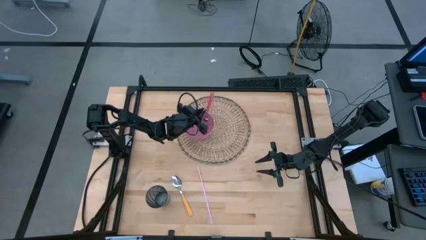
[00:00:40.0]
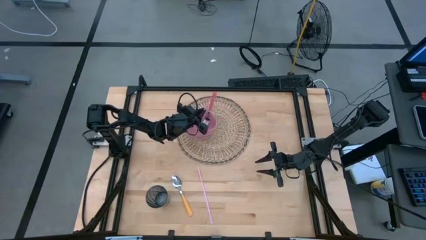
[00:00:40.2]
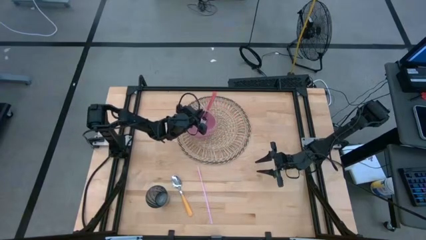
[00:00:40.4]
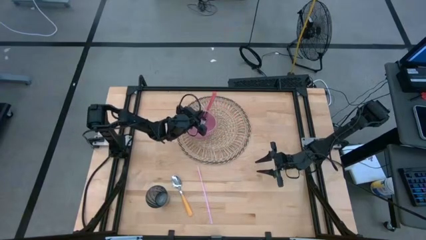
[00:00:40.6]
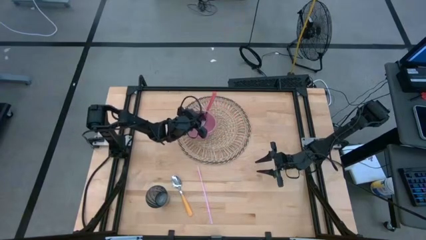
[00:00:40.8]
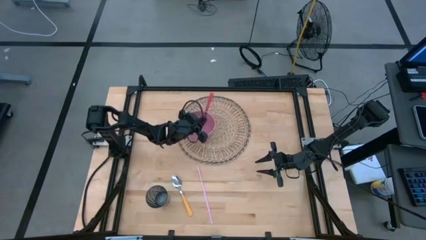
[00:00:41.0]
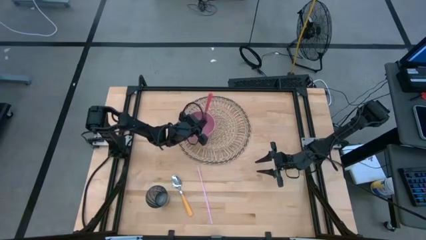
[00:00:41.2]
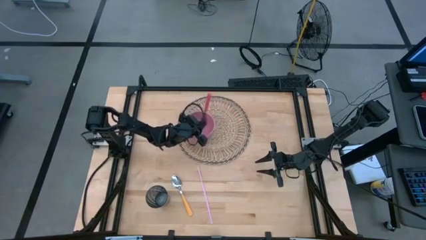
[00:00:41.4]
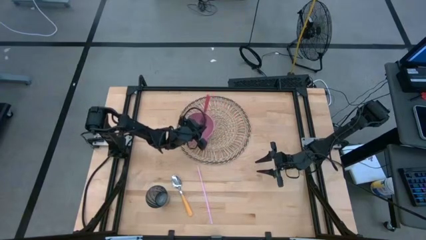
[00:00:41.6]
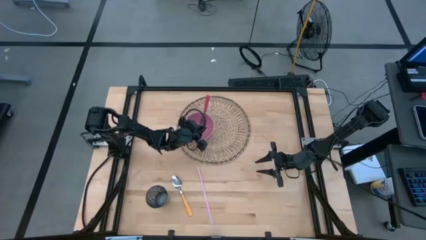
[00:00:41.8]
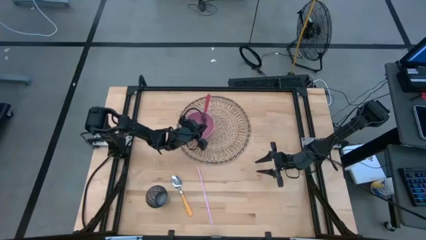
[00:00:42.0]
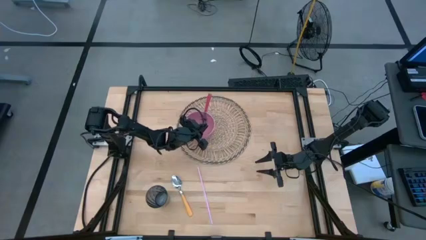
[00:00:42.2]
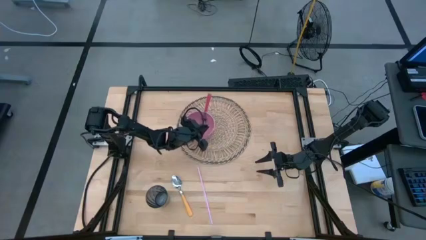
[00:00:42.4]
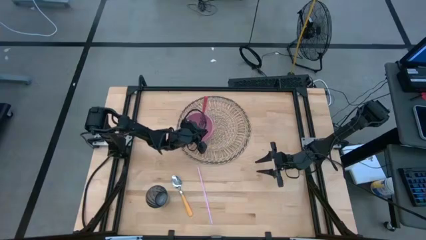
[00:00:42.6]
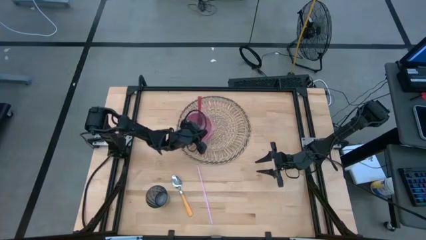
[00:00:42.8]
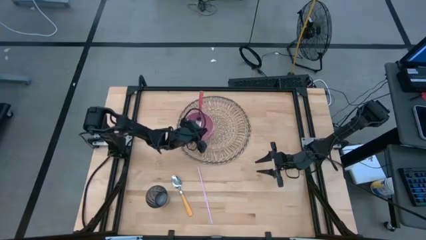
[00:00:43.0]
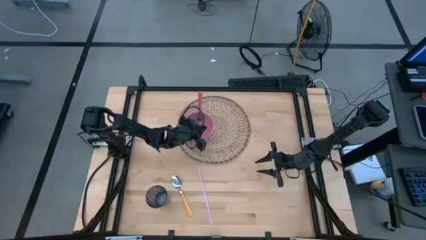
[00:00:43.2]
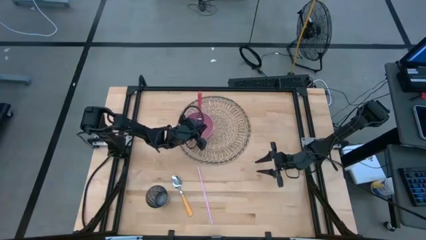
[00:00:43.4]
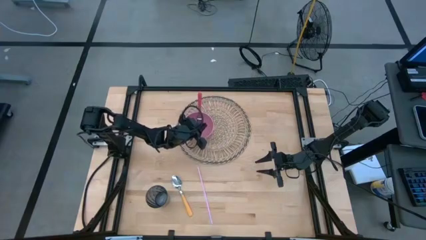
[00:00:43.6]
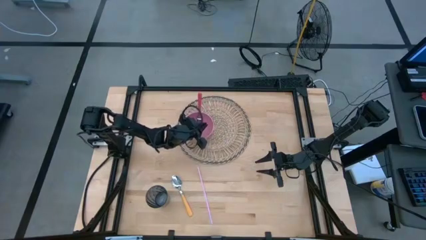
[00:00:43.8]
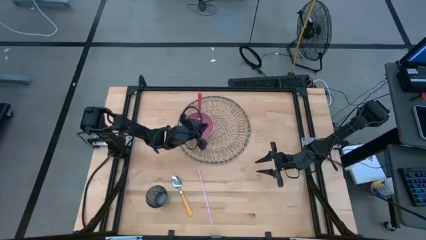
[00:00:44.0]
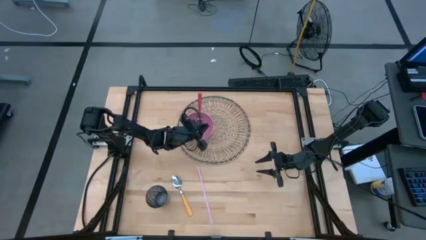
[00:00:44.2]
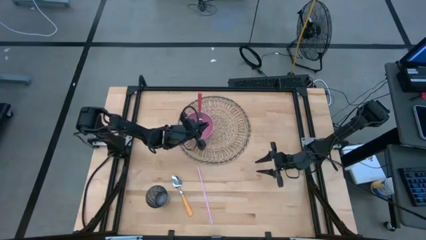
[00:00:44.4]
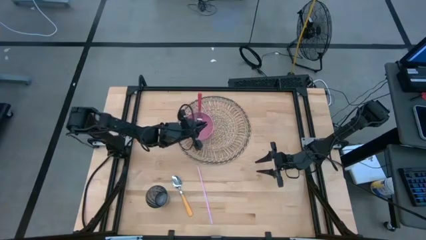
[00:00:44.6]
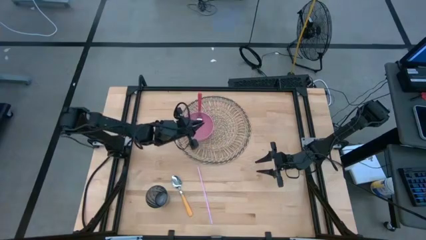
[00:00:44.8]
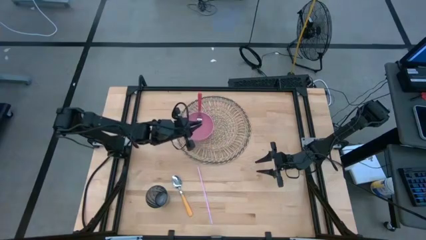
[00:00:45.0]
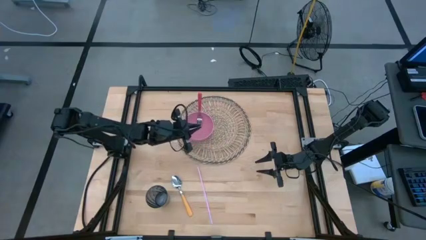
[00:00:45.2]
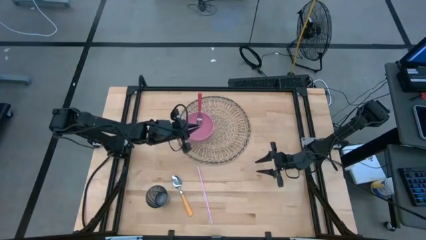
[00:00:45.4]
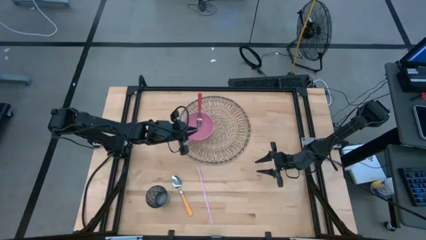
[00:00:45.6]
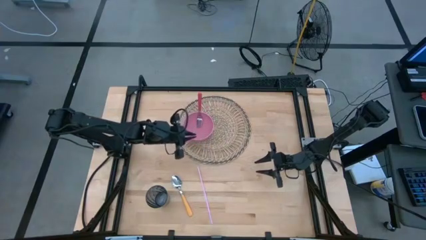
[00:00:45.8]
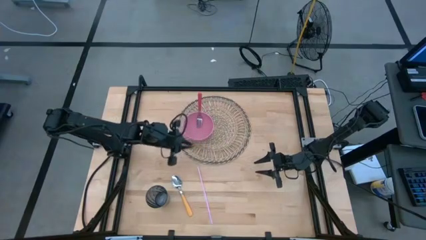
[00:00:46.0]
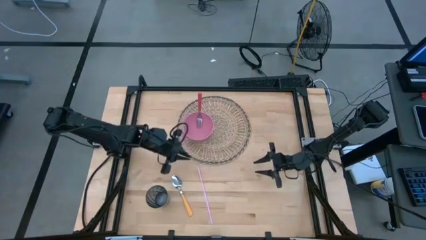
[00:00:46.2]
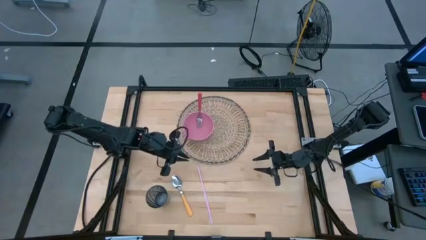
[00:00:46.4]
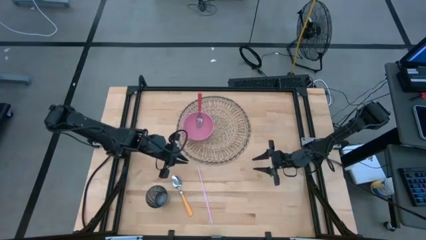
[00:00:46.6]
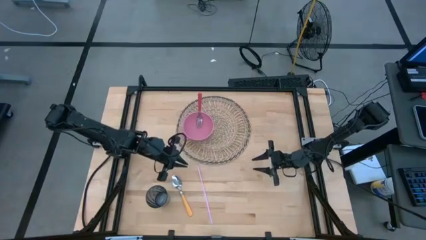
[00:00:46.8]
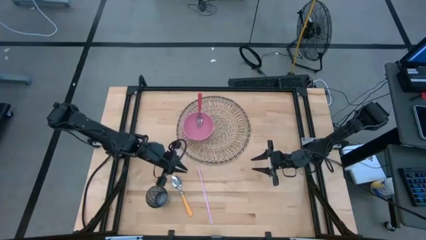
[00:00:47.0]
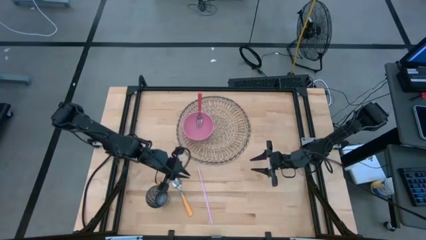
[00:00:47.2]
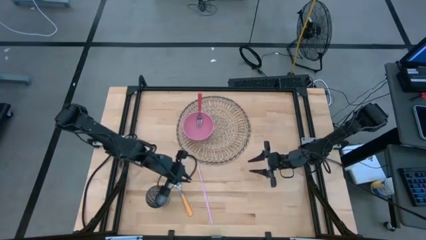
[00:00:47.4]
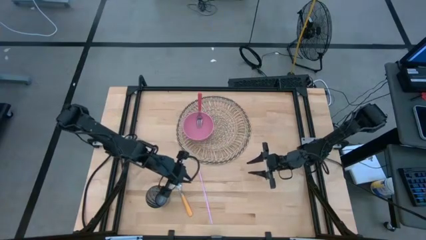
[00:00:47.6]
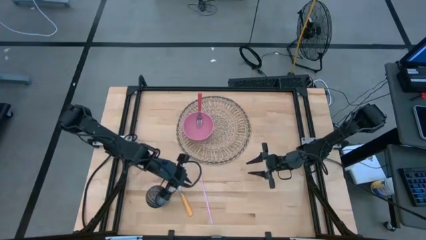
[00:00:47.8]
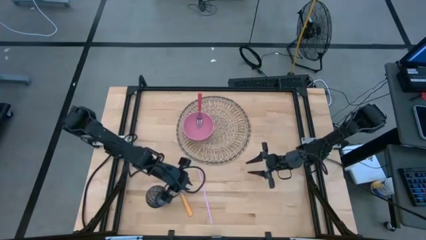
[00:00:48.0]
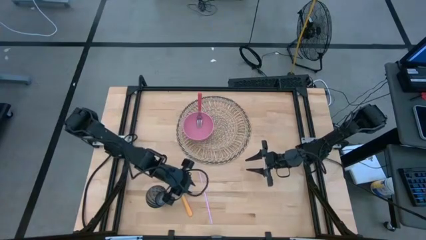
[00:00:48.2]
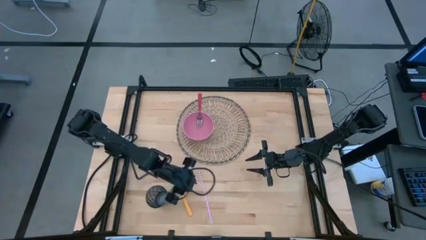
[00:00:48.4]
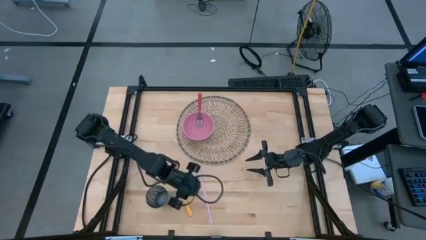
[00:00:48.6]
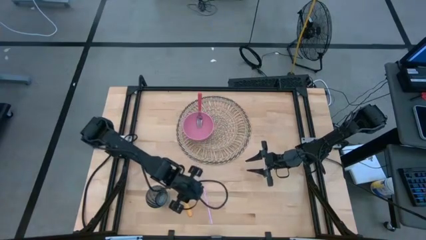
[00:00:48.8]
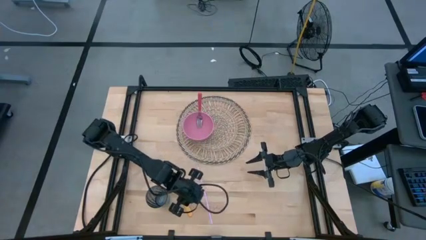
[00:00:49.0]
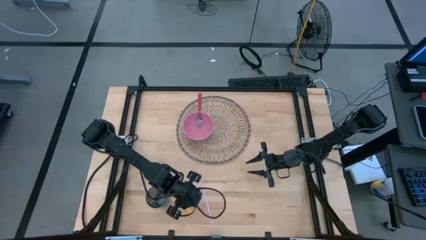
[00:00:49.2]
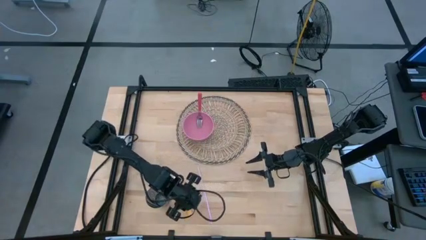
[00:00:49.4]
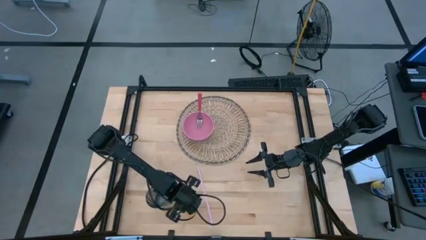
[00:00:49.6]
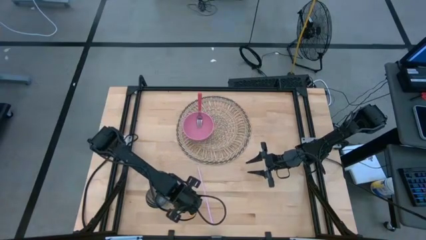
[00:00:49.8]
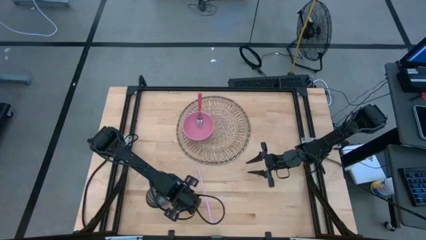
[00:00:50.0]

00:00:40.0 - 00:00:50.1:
Task: Pick & Place Utensil
Put the yellow spoon on the bowl on the brown placemat
